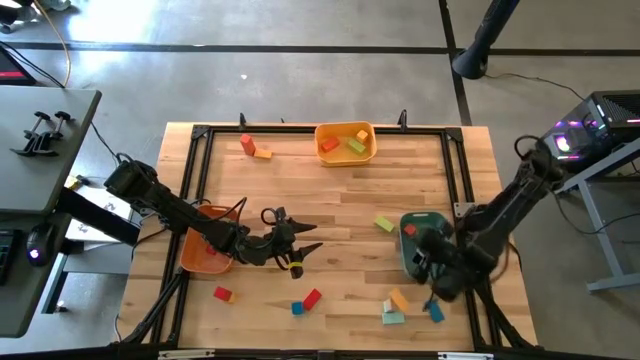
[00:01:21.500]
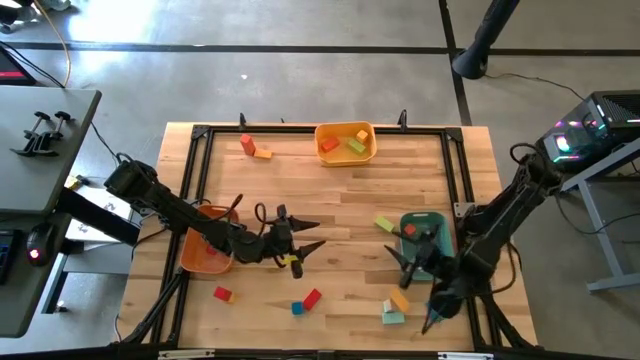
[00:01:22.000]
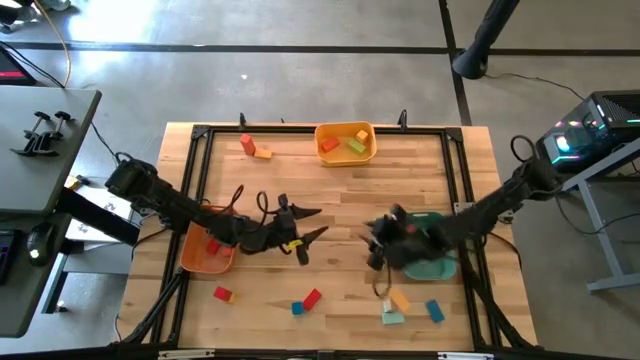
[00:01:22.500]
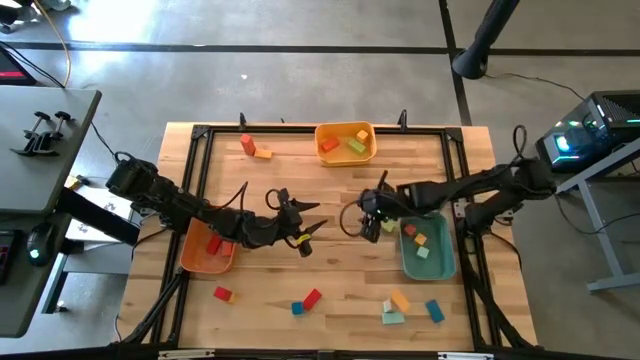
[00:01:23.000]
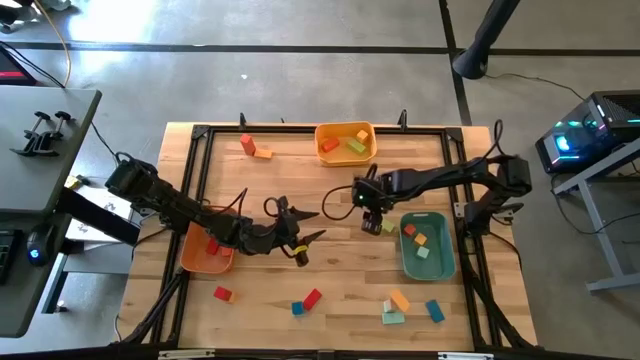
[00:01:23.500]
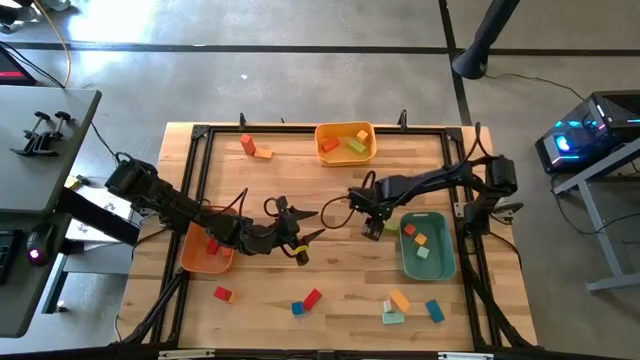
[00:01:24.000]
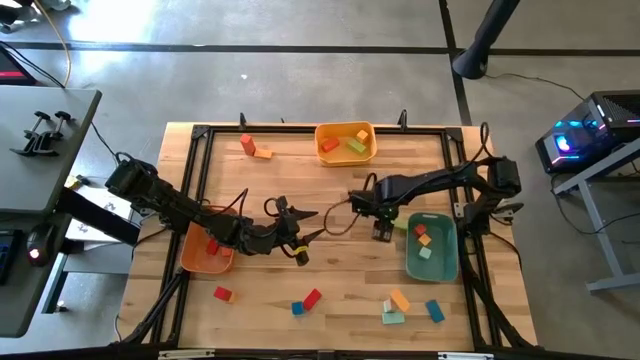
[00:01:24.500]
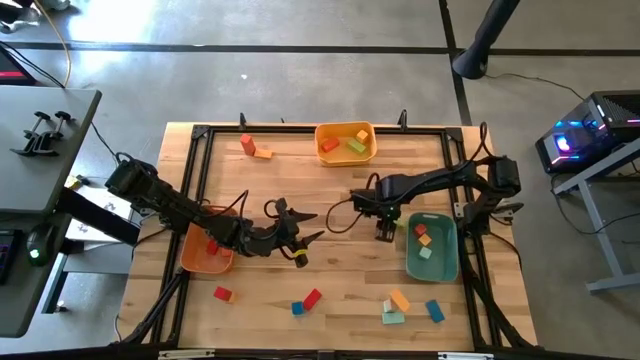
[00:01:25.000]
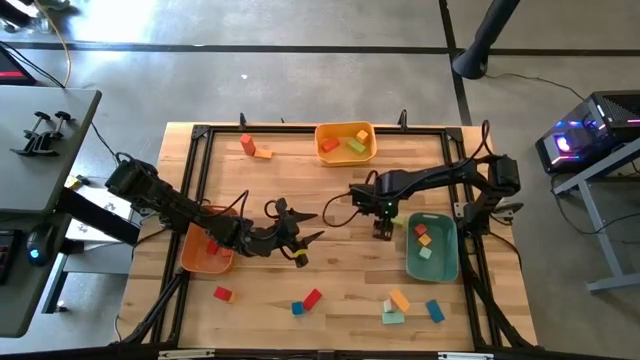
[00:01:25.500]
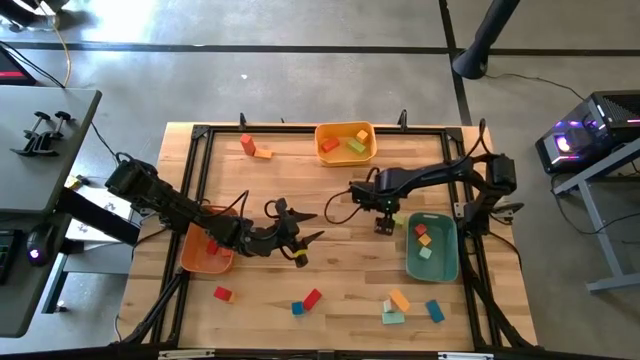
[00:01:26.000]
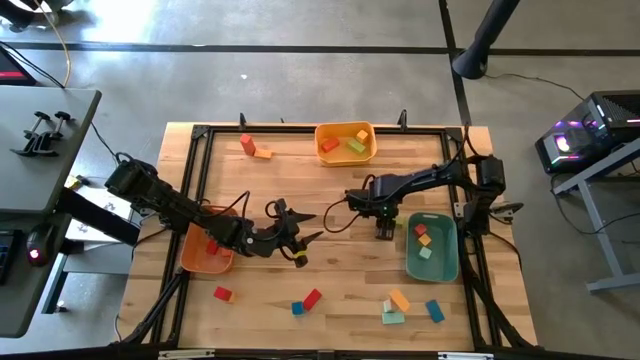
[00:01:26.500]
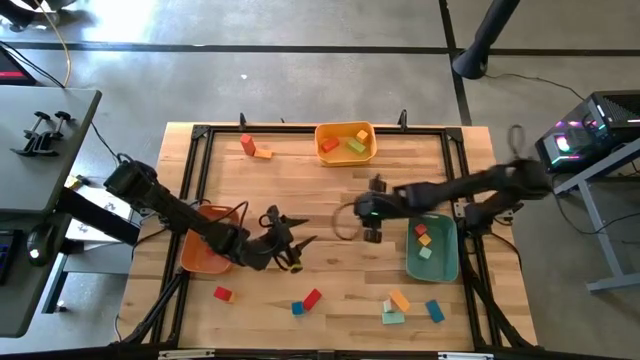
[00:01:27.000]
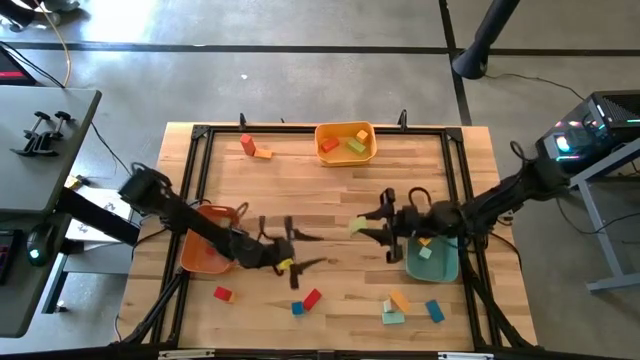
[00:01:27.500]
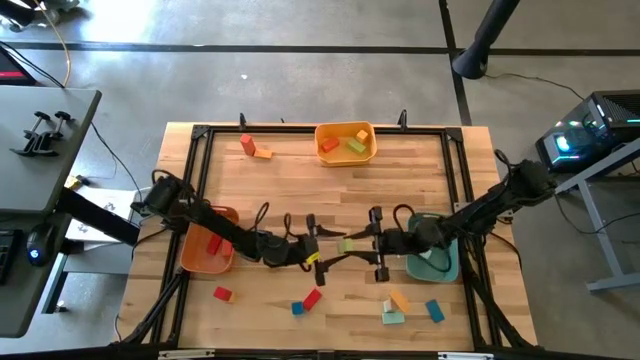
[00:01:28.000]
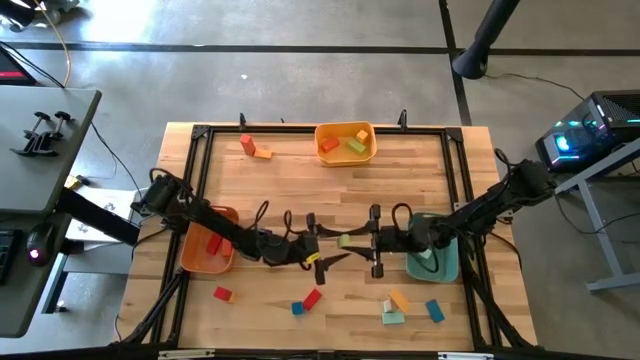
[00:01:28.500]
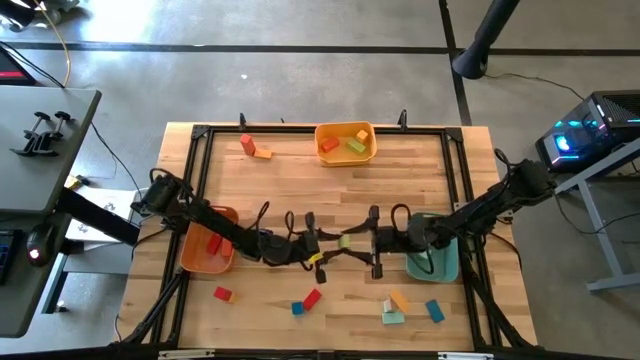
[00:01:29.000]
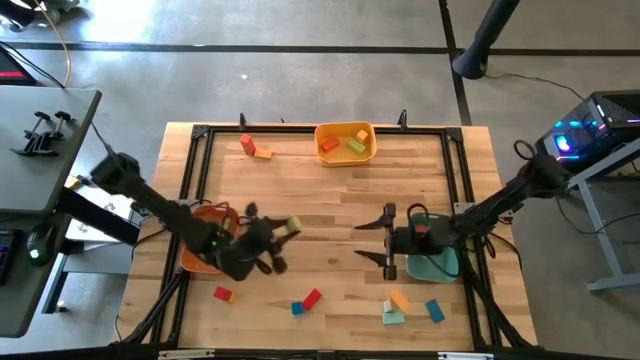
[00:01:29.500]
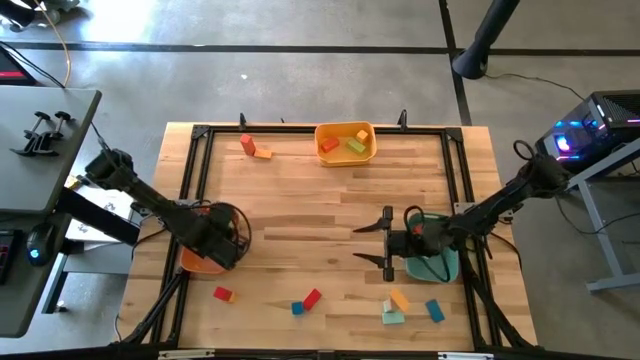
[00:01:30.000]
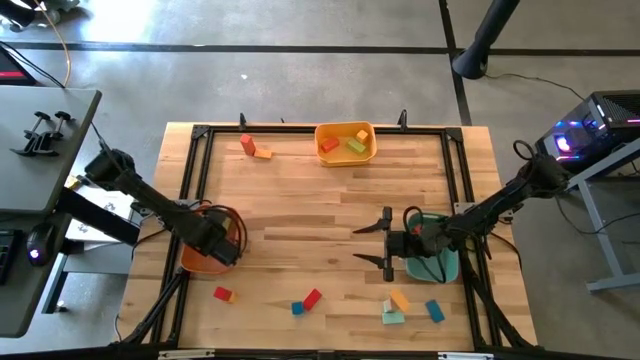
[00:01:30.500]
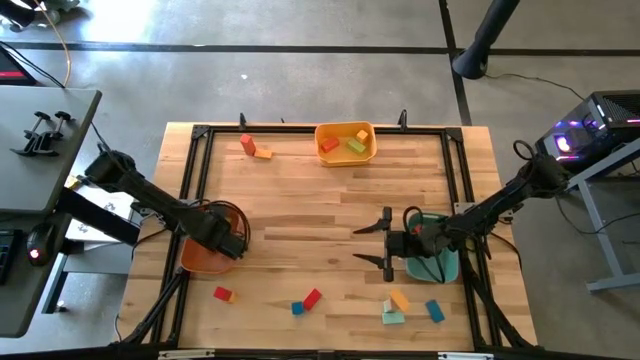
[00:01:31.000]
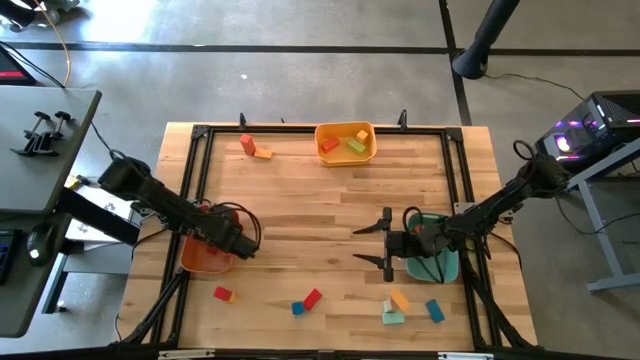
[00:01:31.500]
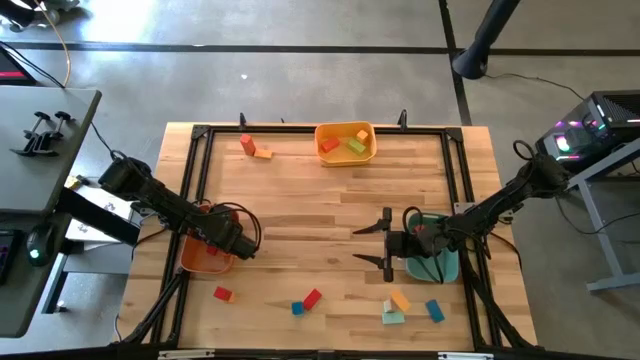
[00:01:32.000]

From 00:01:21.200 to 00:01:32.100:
Task: Sort blocks by size
Put the green medium block into the orange bin

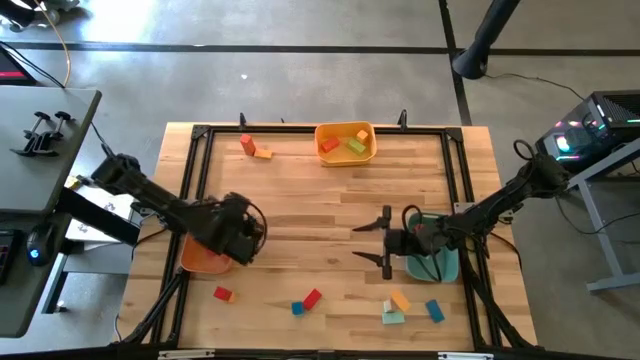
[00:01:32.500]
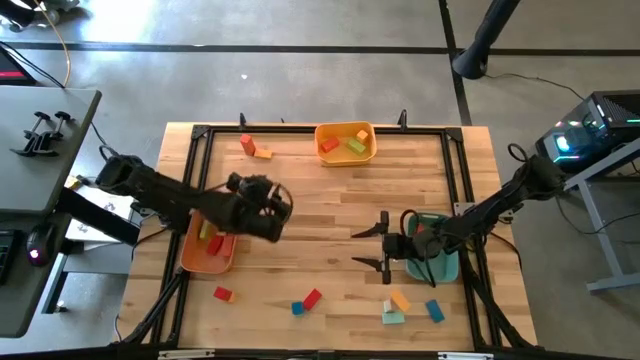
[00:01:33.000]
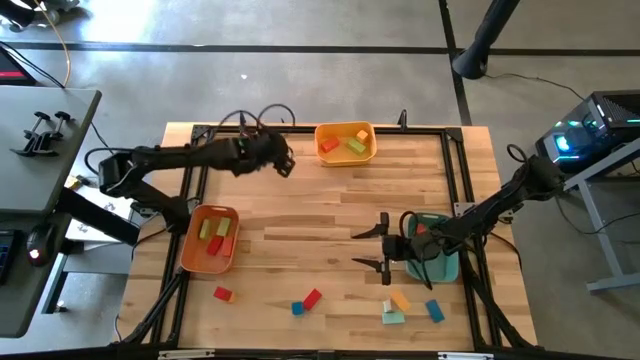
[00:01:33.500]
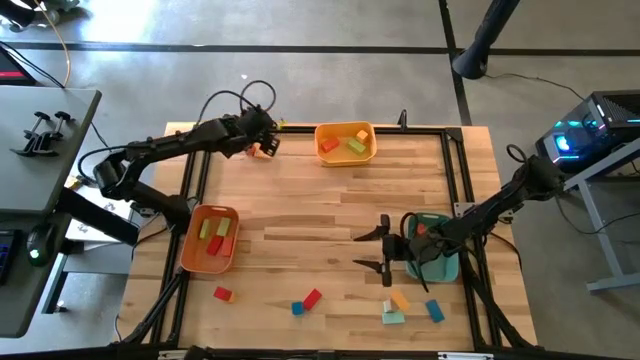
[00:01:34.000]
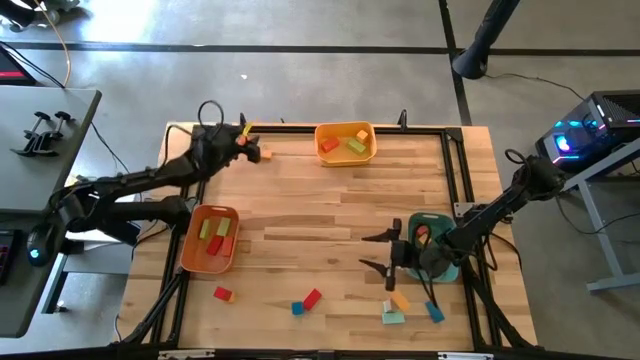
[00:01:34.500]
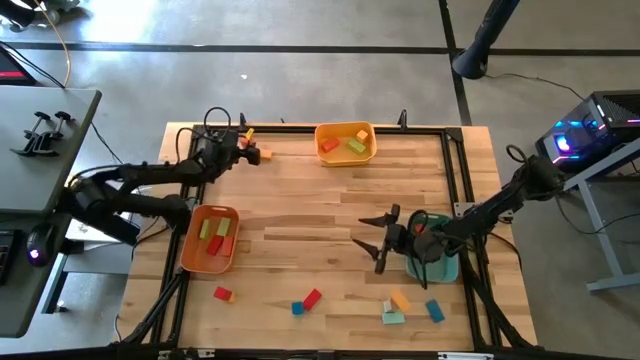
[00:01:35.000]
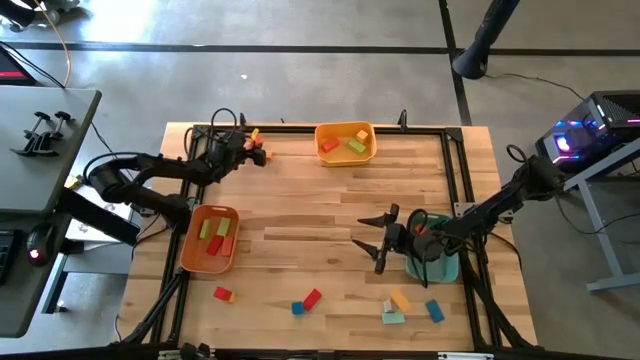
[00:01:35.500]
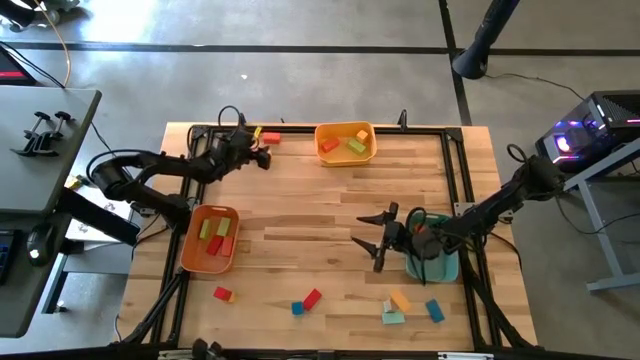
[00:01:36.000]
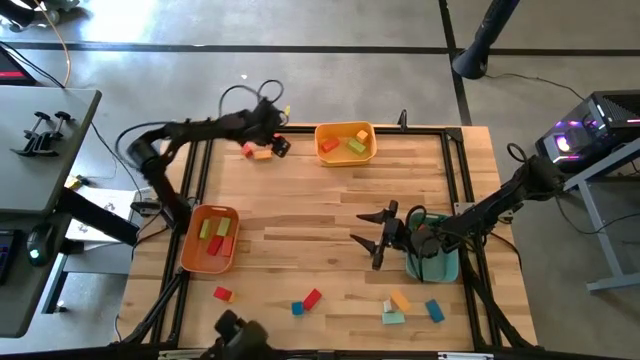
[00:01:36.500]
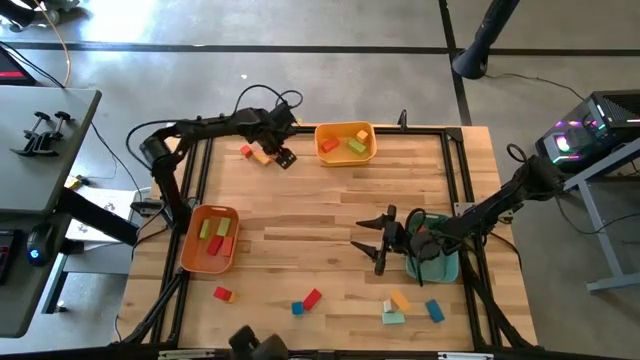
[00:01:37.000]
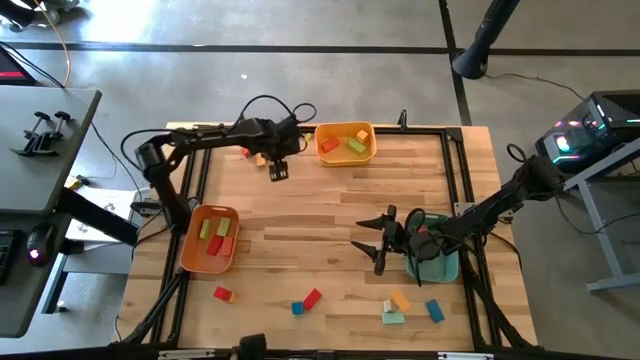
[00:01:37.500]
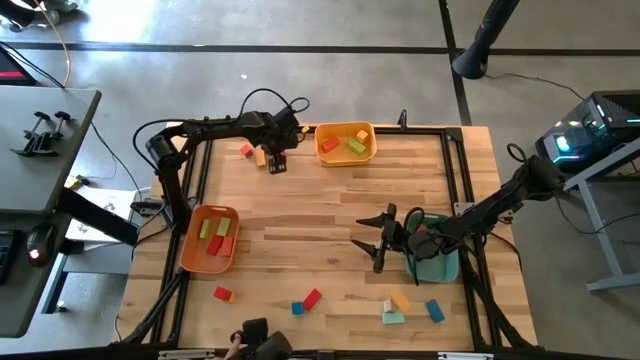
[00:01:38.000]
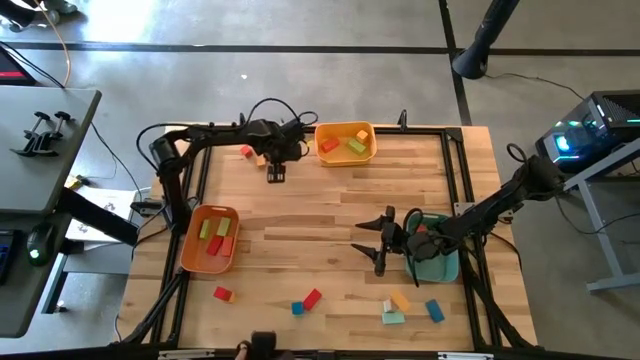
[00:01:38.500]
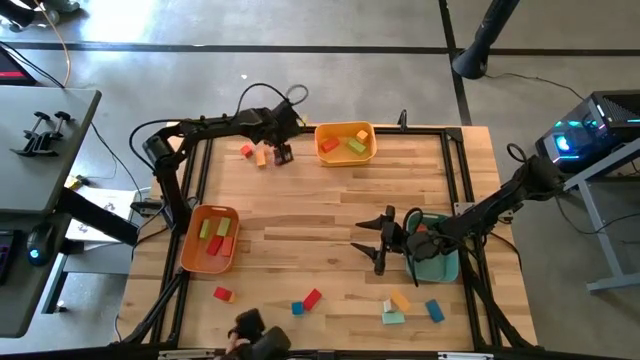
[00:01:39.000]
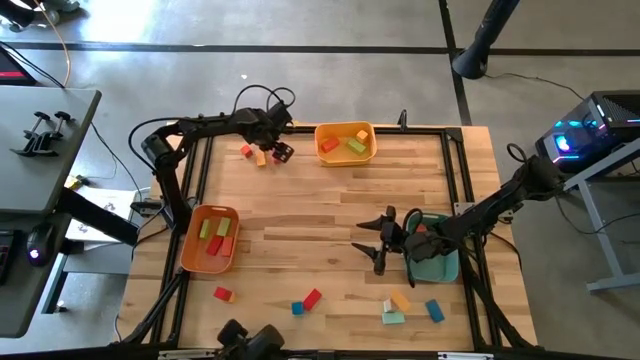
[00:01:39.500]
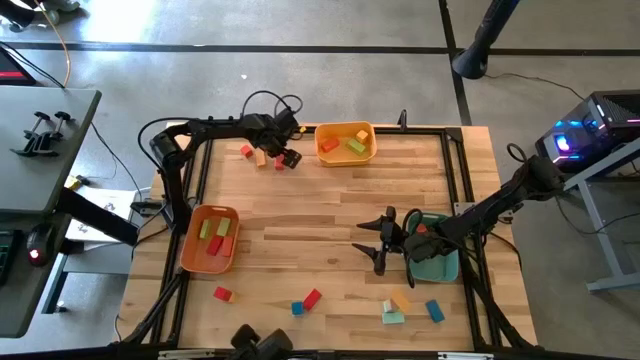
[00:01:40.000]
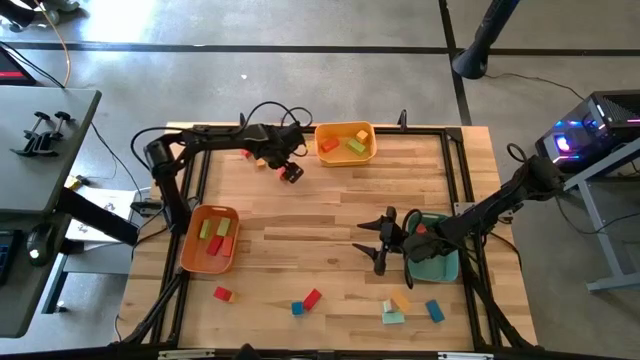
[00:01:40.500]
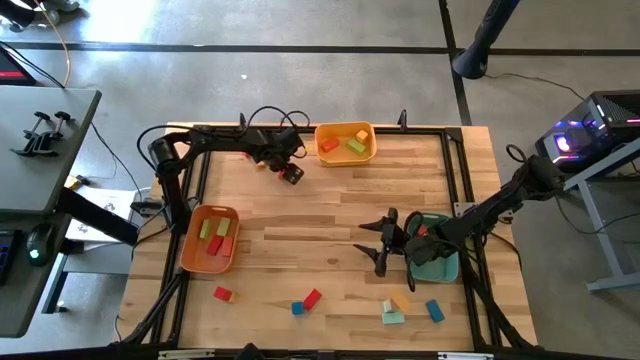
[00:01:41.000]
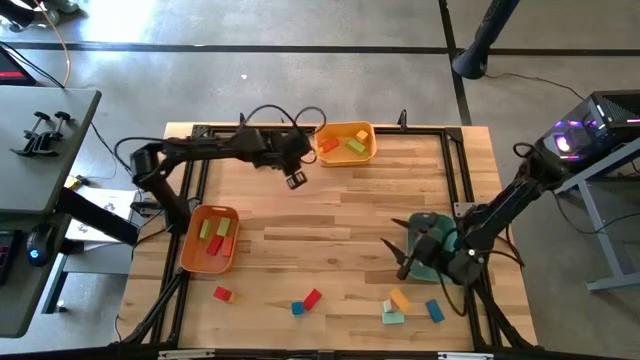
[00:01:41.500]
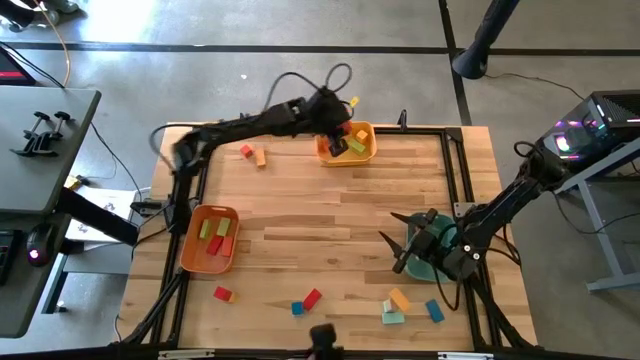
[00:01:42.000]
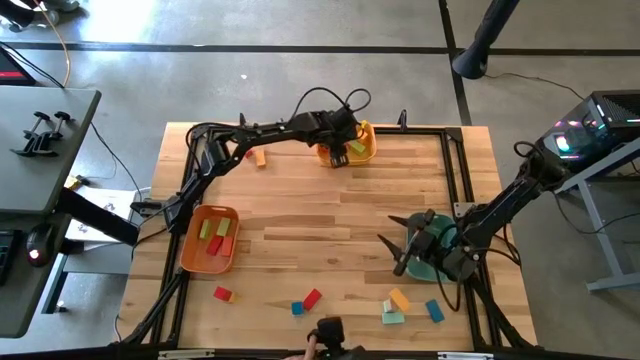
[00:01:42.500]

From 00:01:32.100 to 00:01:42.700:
Put the orange large block into the yellow bin
